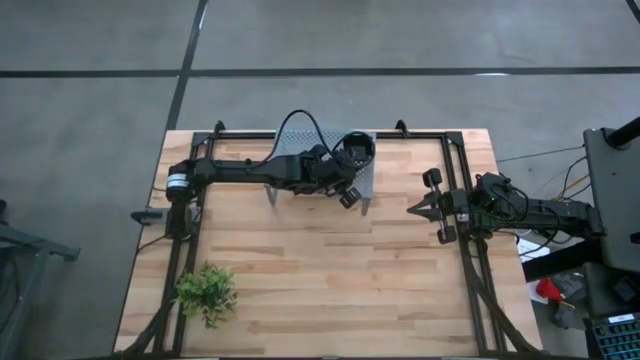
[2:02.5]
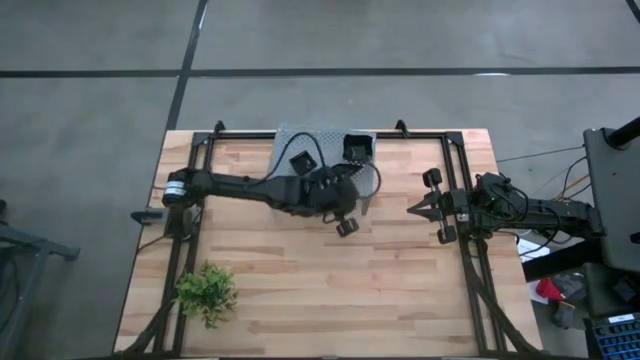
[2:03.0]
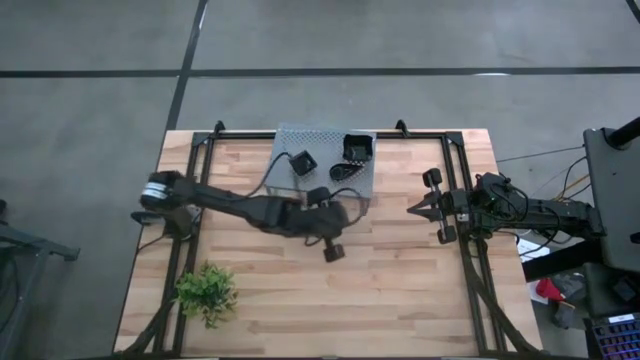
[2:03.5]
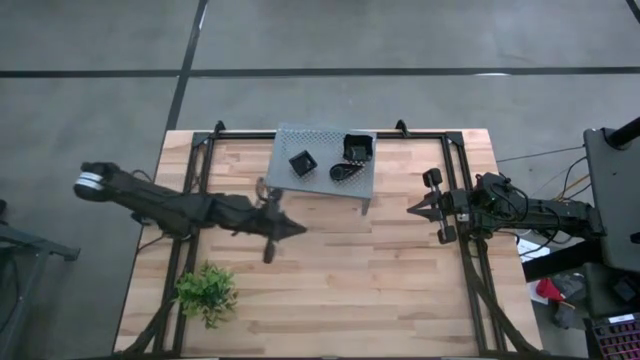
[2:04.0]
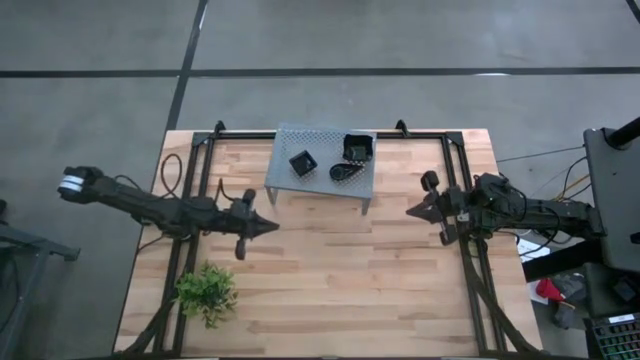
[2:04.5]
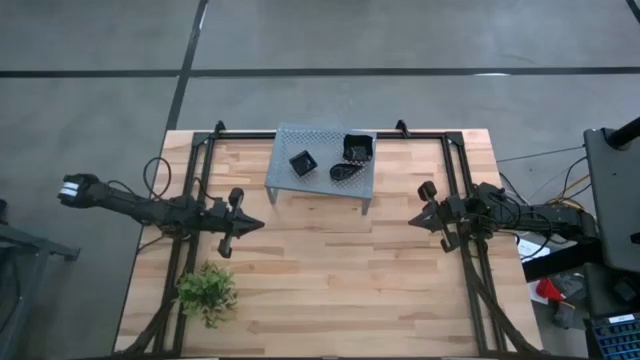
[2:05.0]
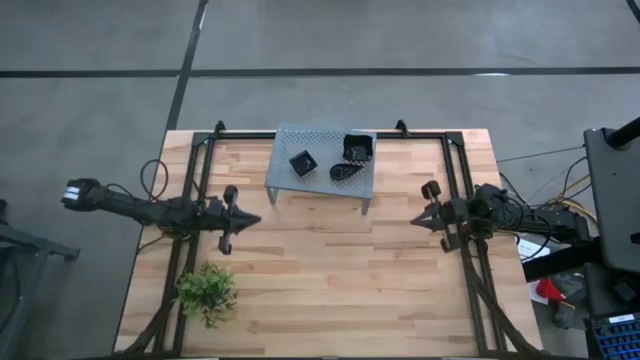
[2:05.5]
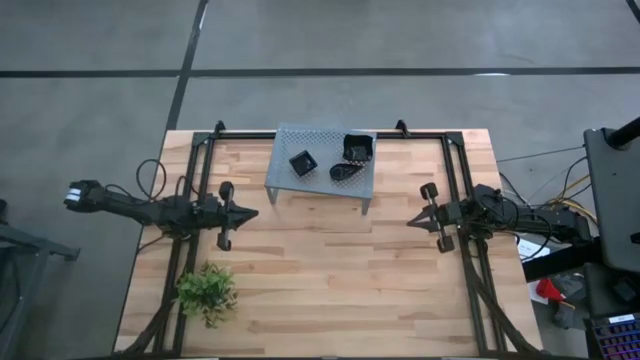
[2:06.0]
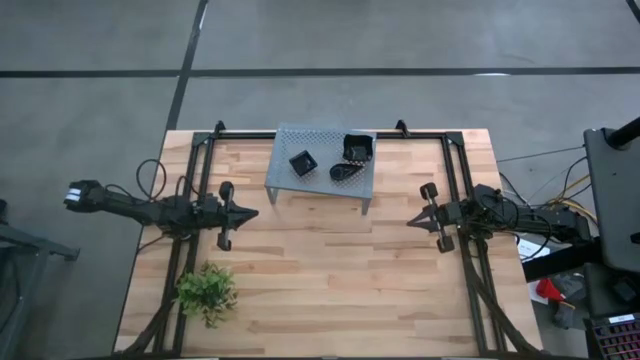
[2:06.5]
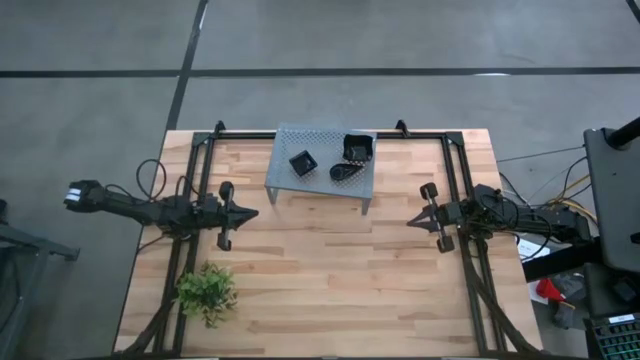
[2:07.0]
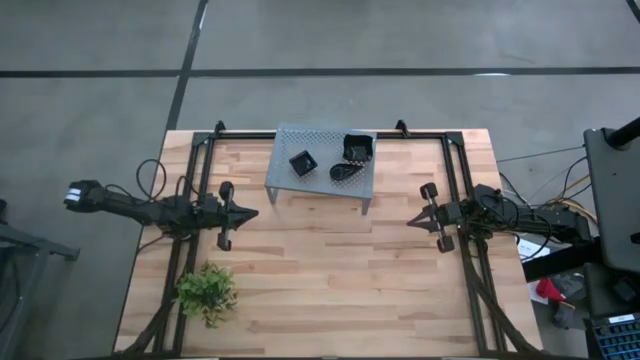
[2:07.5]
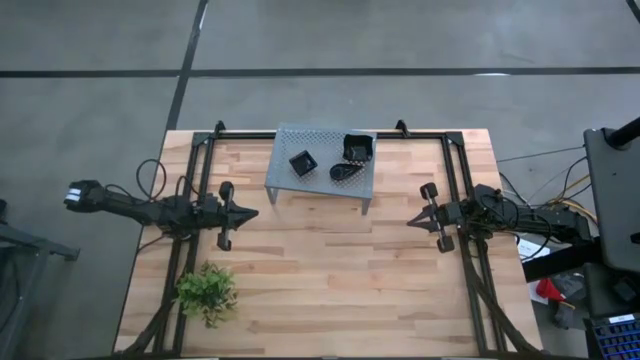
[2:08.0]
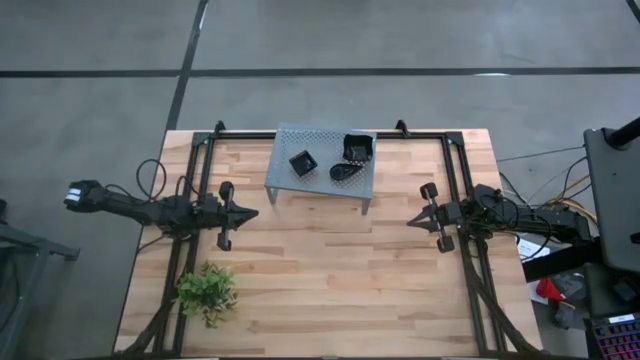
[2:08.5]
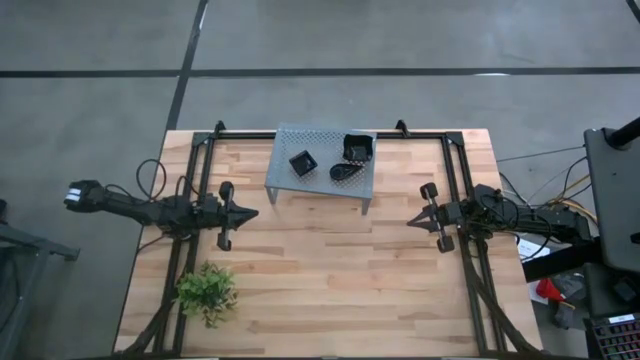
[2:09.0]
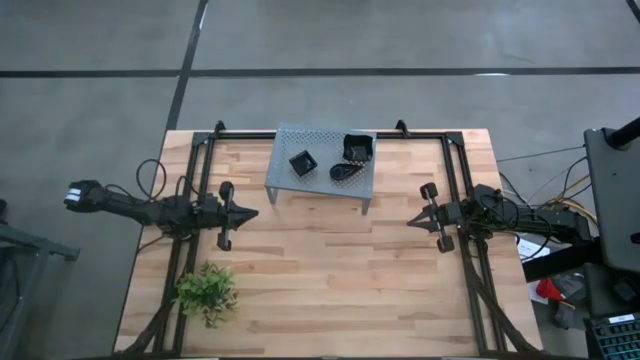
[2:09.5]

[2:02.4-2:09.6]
Task: Pick & Place Mini shaped plates
Return to Home Position

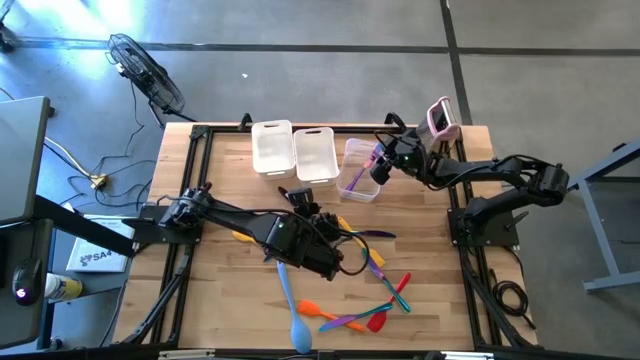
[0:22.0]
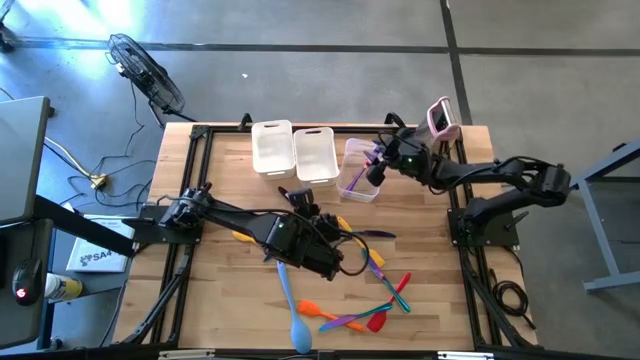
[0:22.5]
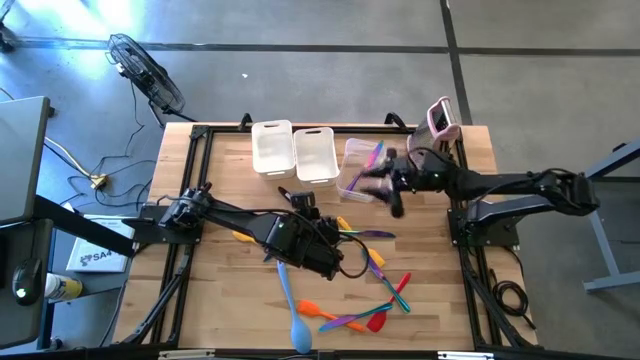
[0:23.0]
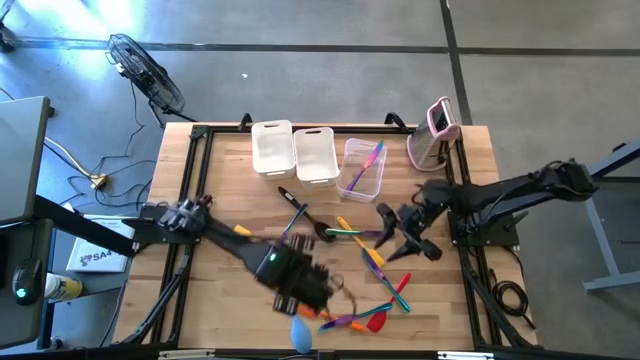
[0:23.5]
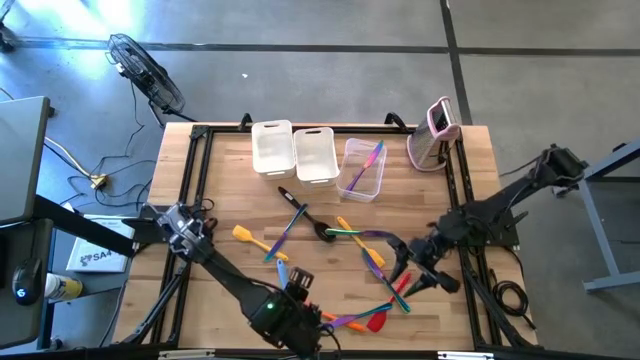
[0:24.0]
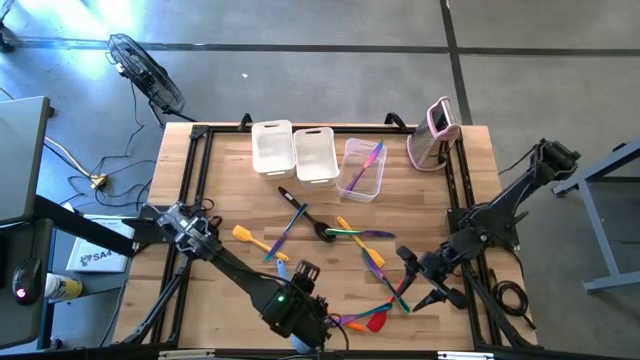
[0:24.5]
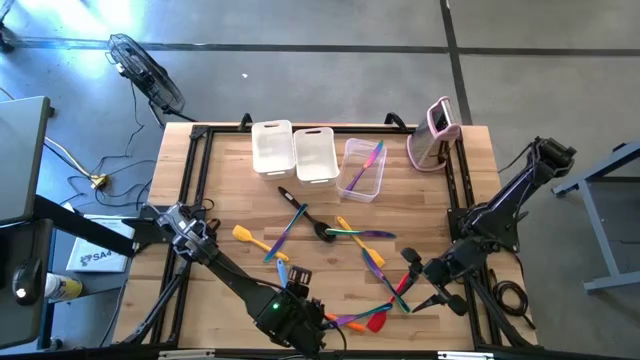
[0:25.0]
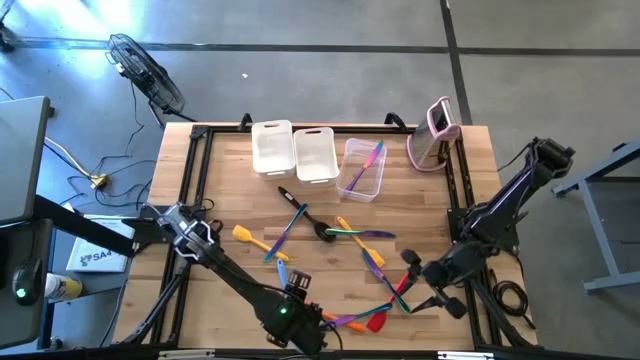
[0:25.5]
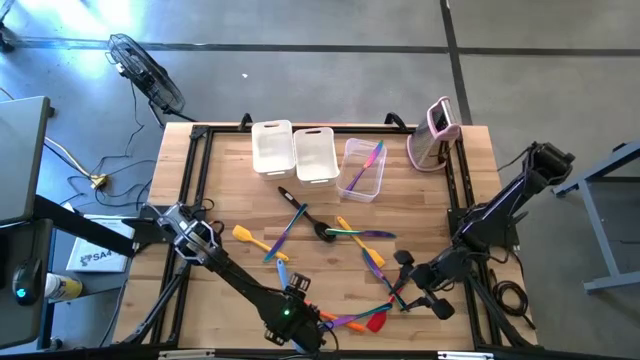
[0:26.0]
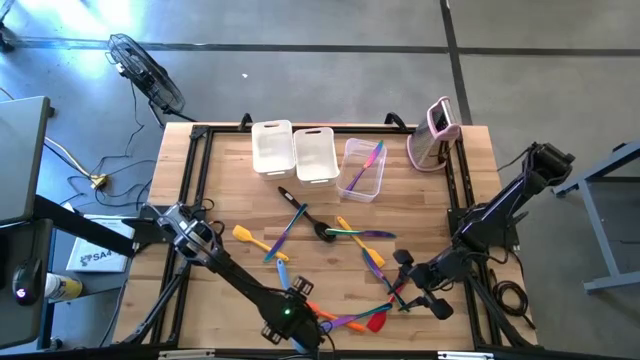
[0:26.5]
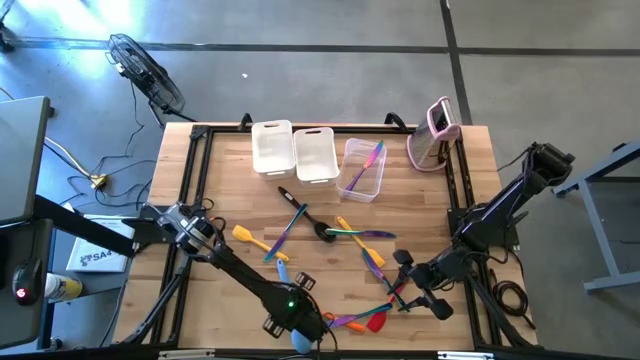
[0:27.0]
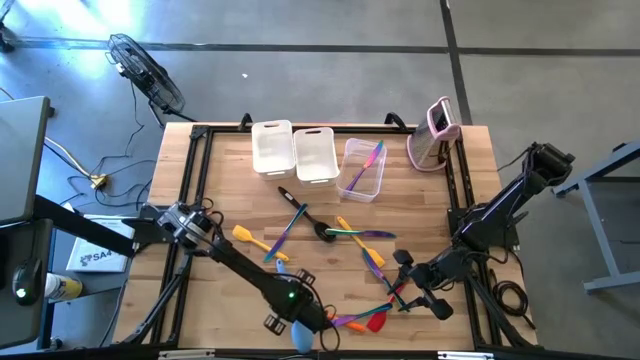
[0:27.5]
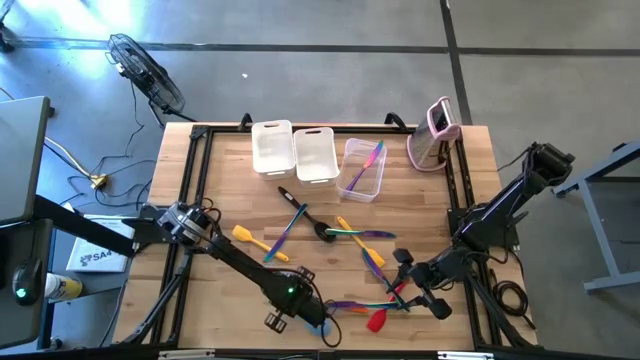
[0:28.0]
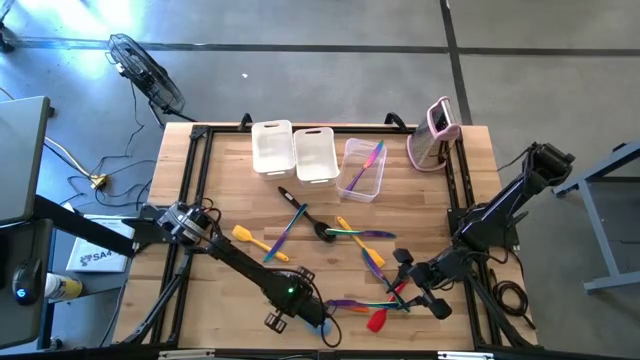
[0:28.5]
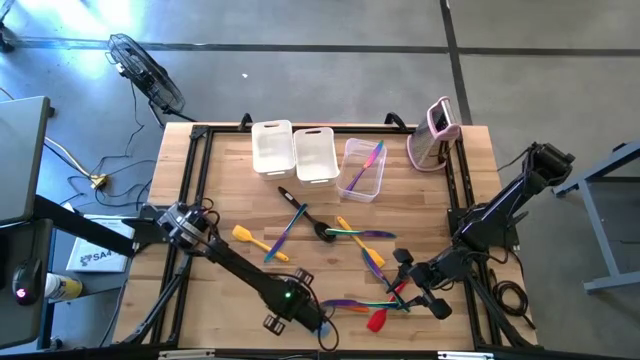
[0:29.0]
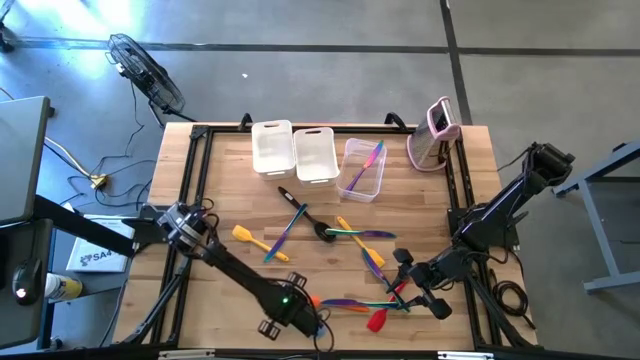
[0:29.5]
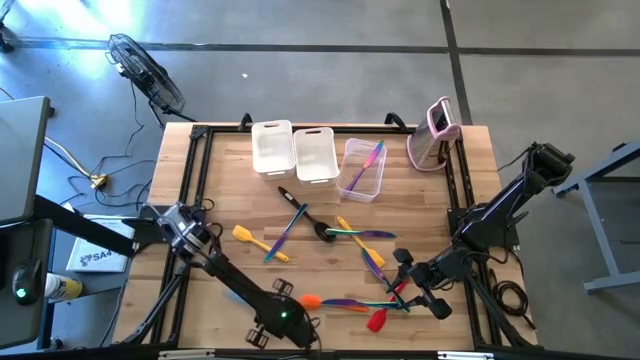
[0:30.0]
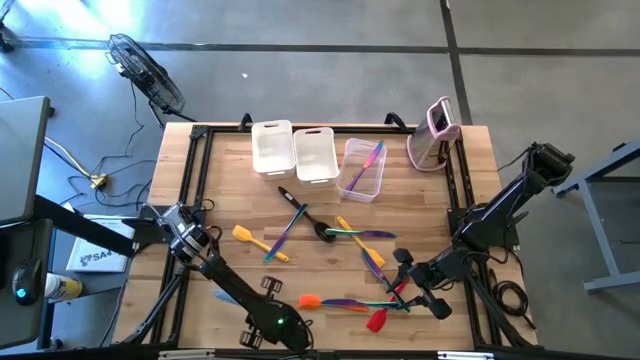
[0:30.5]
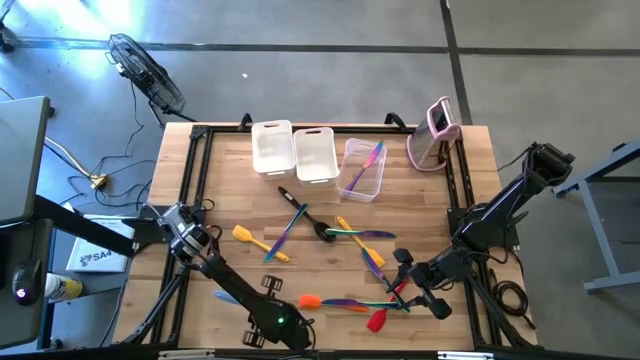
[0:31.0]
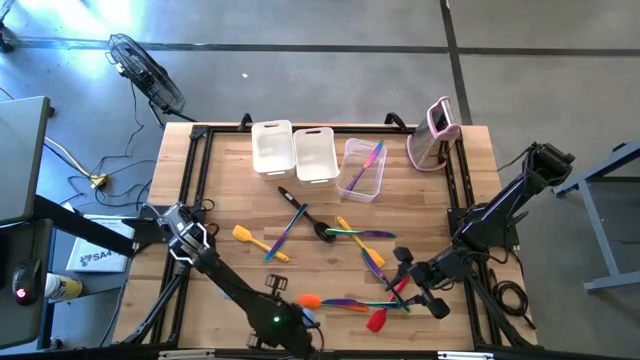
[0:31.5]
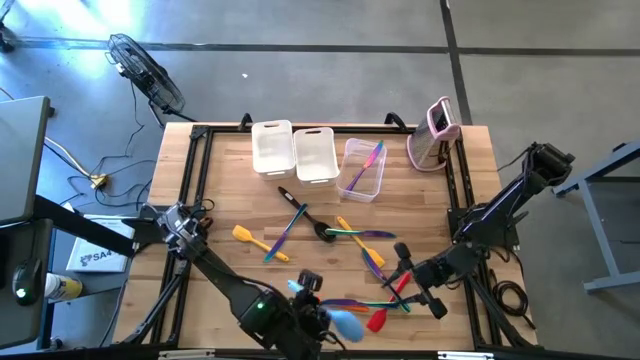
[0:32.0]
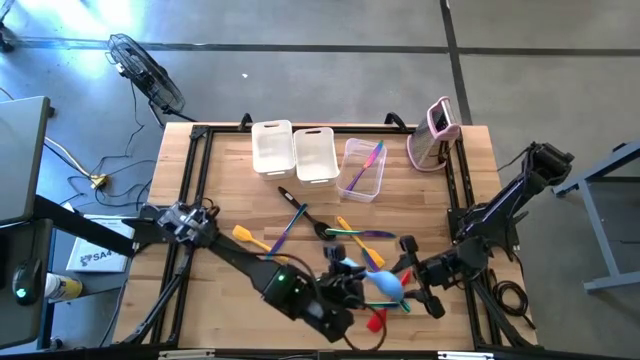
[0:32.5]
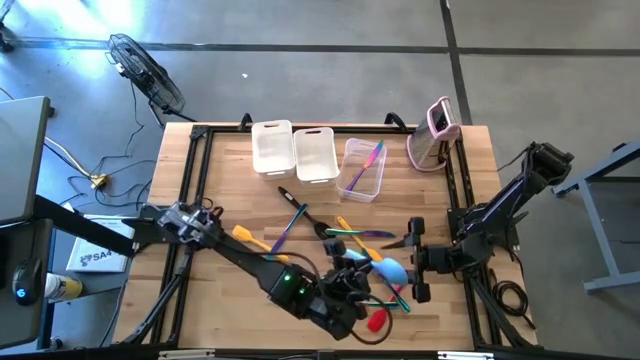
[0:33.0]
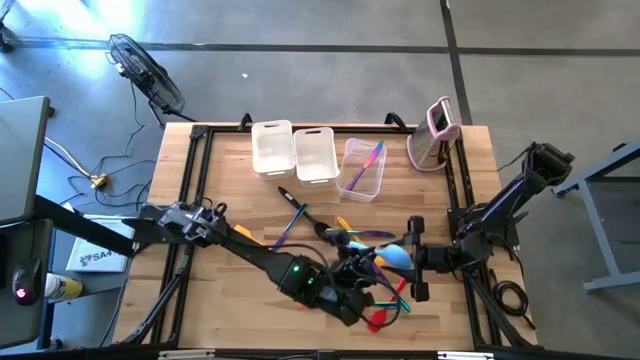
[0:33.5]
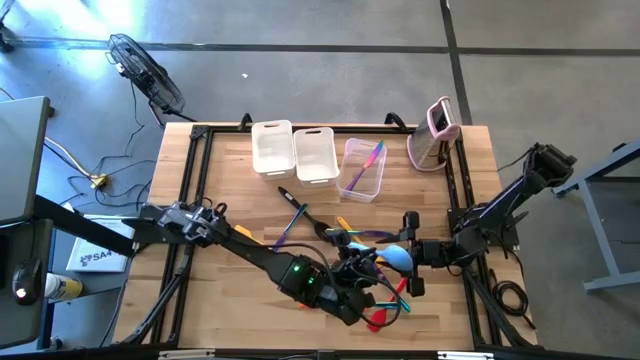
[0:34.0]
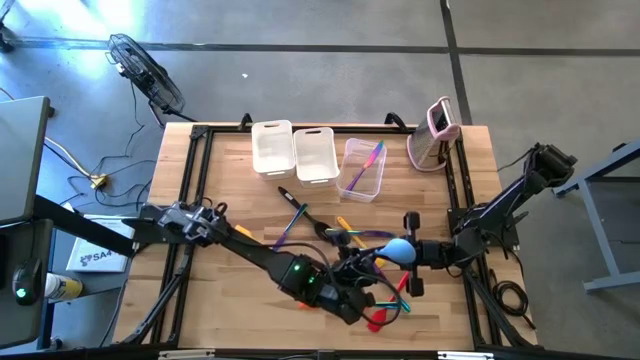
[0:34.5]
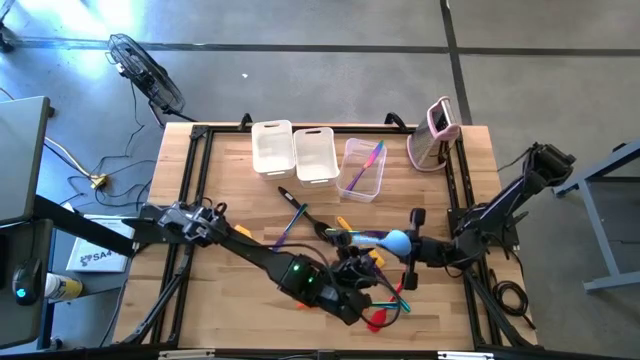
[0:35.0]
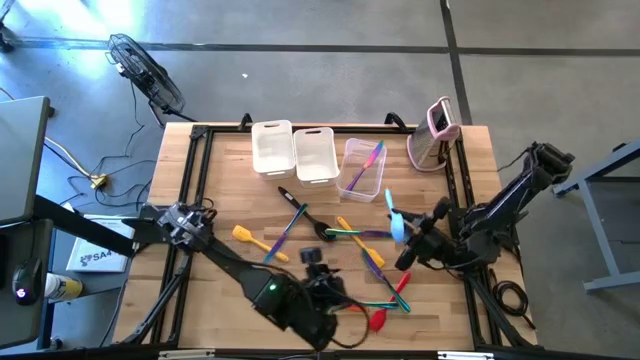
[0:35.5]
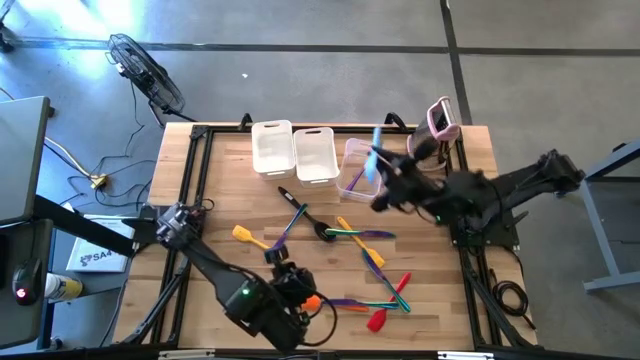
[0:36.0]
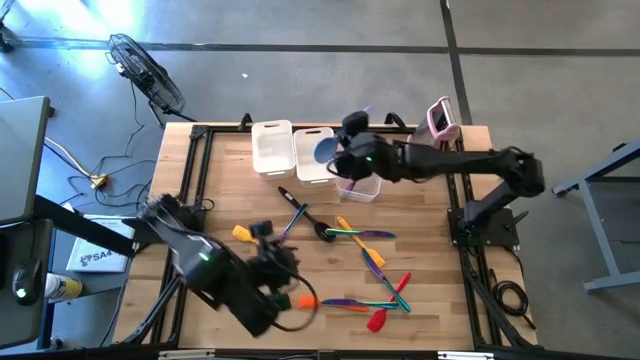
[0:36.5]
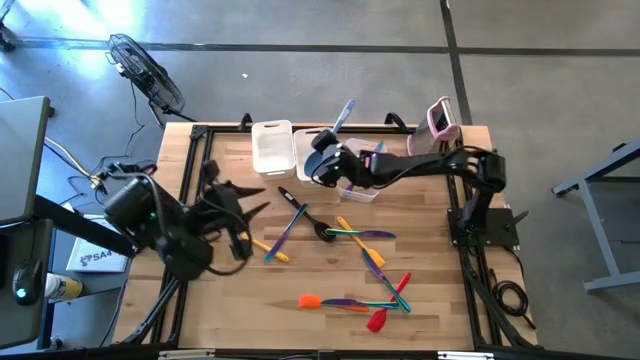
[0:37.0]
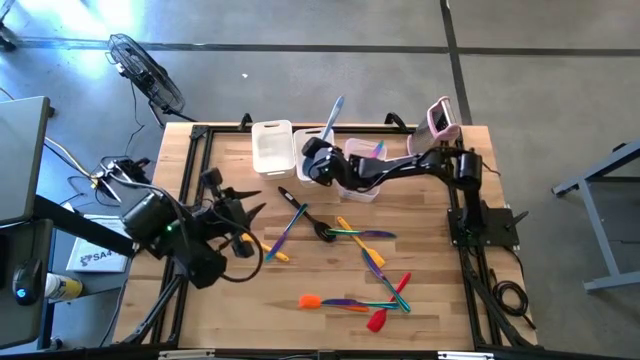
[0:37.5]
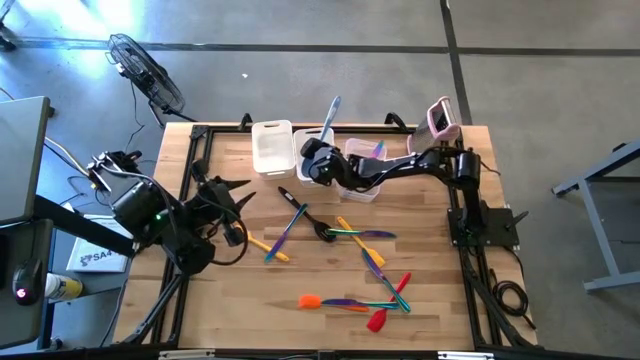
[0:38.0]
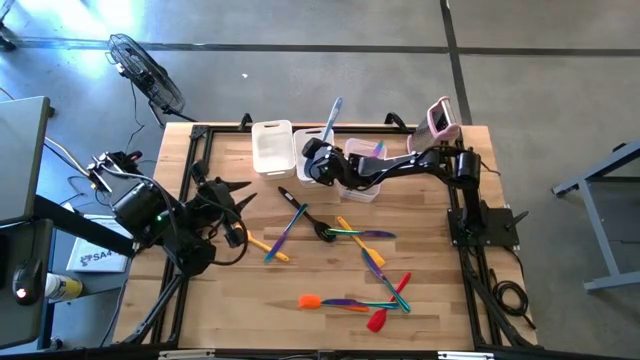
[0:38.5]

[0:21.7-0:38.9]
Task: Pick & Place Kitchen Items
Put the blue serving spoon into the right white bin
